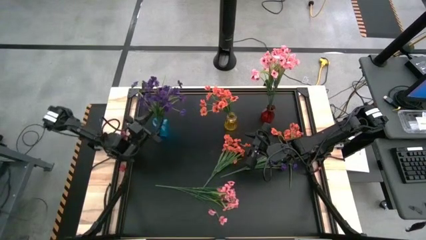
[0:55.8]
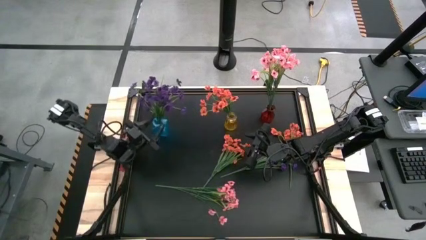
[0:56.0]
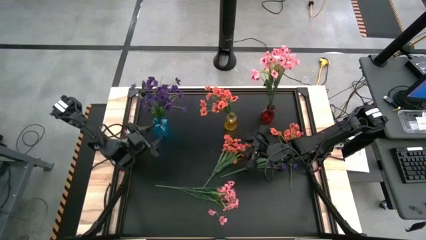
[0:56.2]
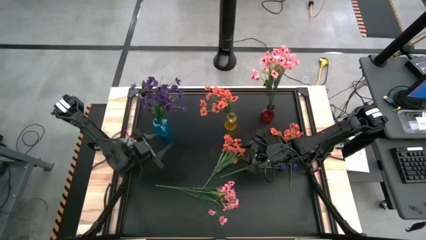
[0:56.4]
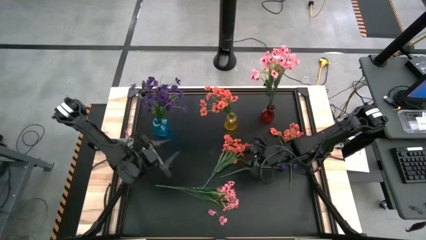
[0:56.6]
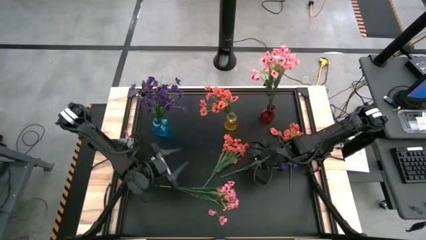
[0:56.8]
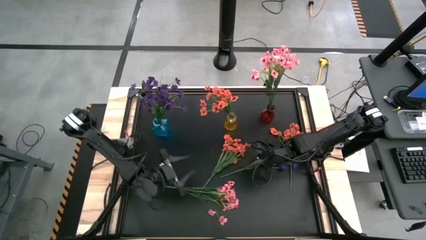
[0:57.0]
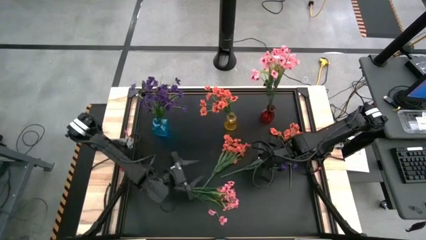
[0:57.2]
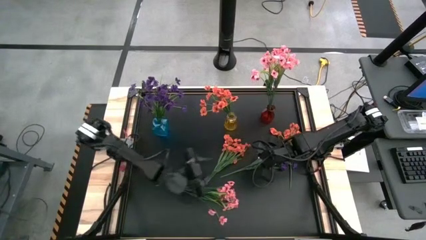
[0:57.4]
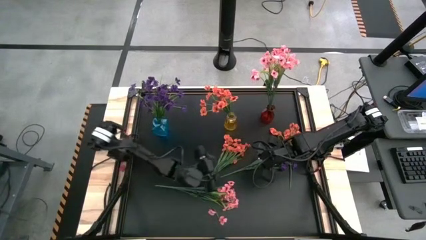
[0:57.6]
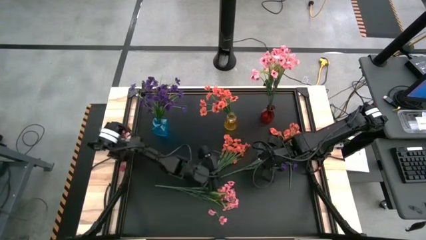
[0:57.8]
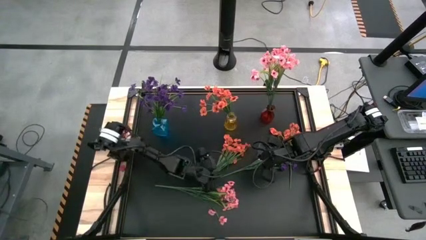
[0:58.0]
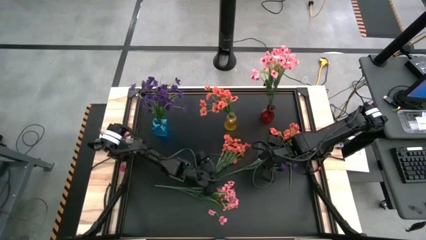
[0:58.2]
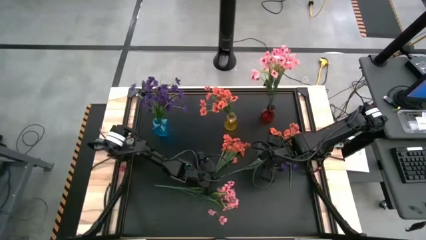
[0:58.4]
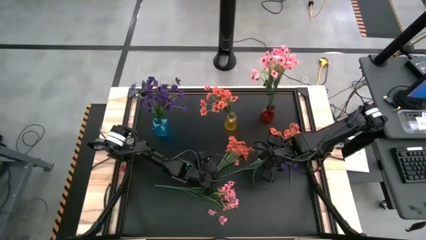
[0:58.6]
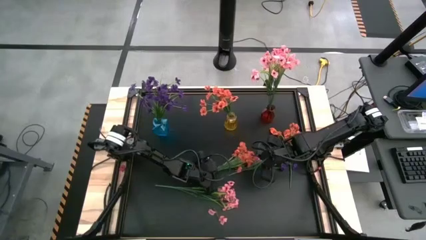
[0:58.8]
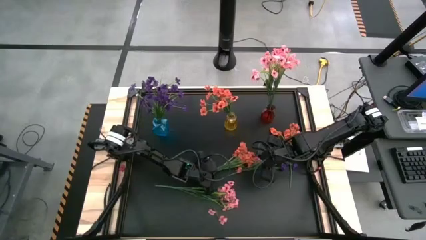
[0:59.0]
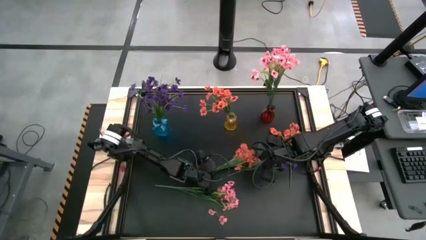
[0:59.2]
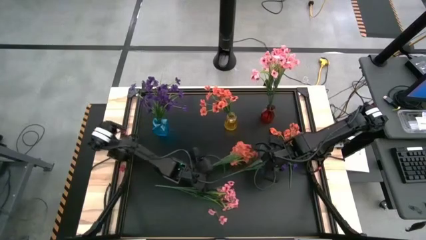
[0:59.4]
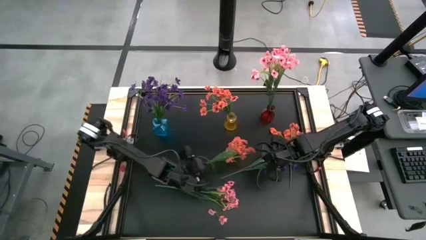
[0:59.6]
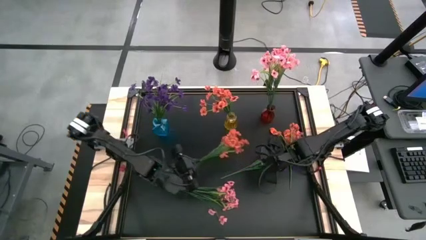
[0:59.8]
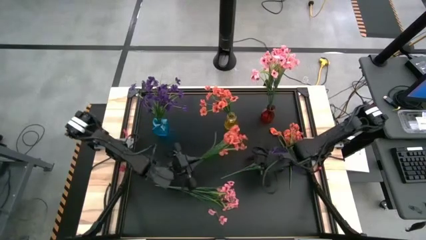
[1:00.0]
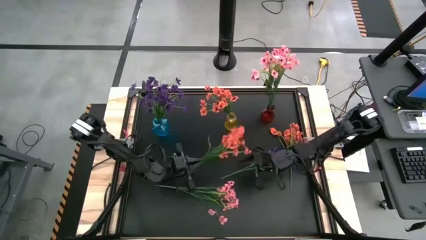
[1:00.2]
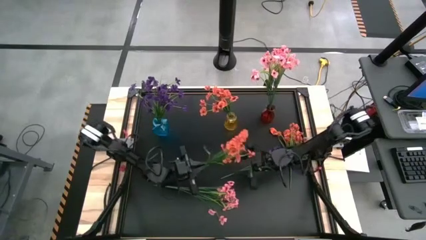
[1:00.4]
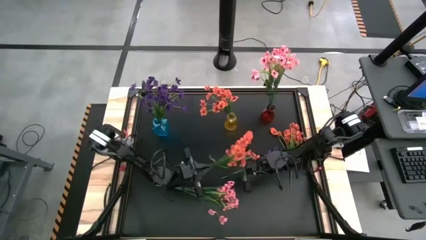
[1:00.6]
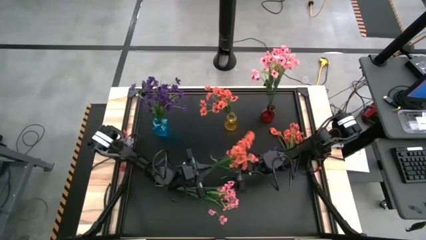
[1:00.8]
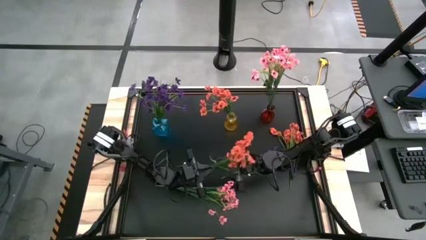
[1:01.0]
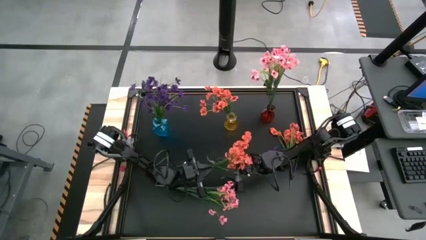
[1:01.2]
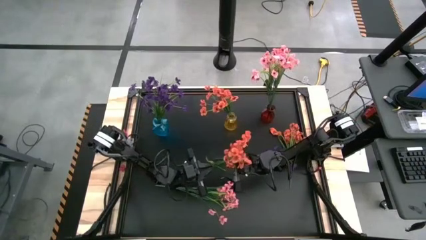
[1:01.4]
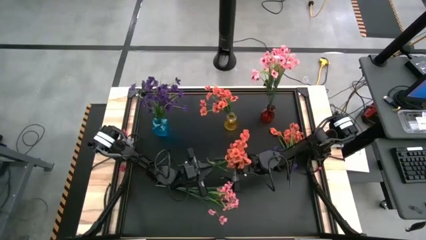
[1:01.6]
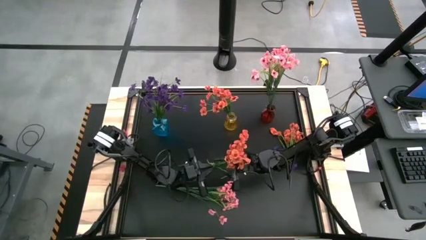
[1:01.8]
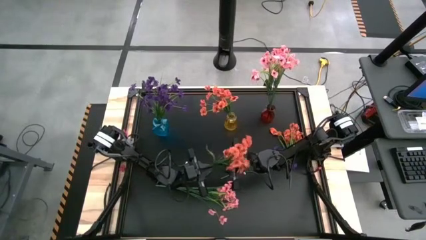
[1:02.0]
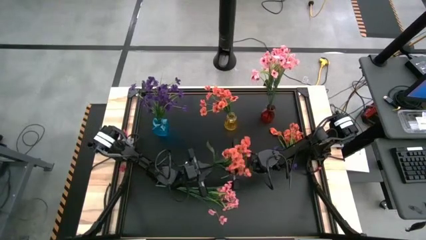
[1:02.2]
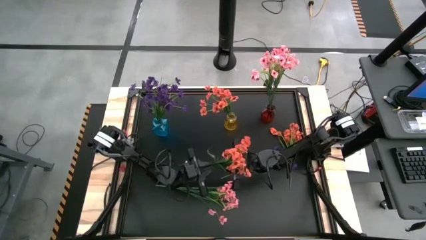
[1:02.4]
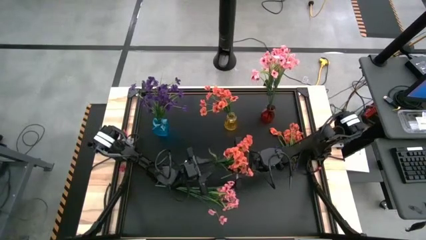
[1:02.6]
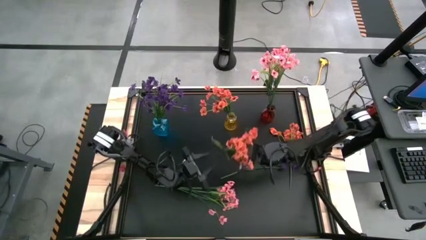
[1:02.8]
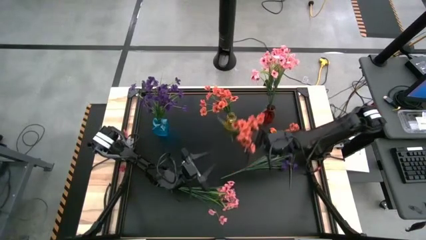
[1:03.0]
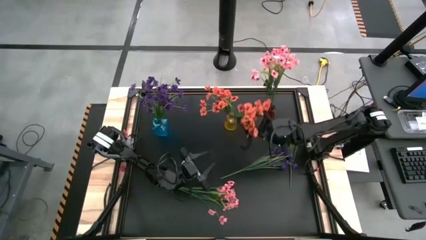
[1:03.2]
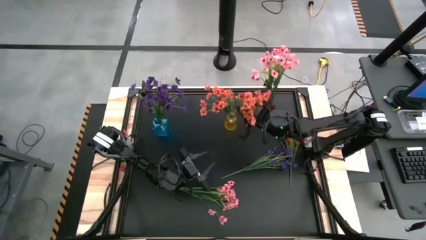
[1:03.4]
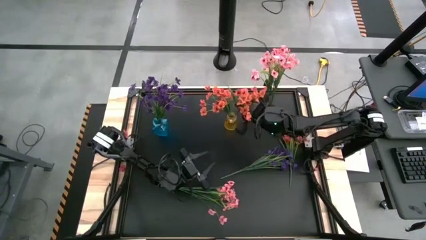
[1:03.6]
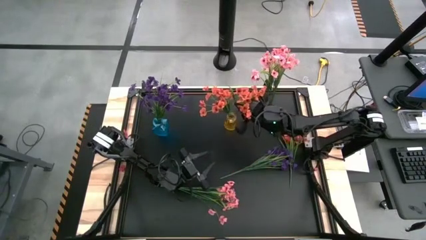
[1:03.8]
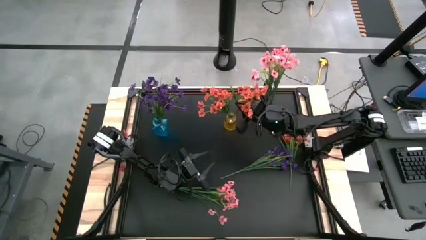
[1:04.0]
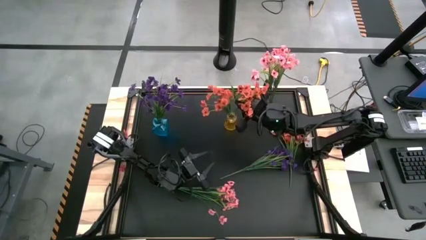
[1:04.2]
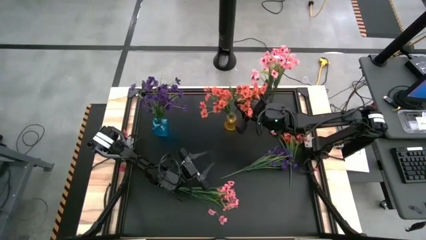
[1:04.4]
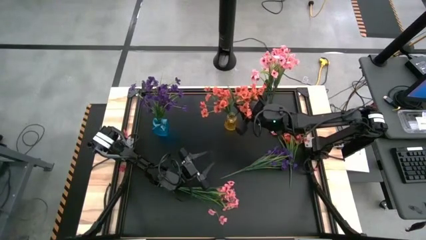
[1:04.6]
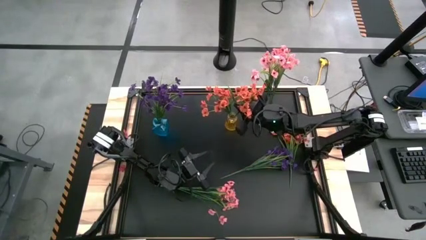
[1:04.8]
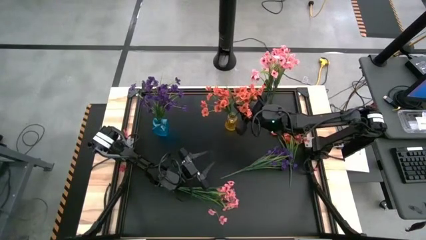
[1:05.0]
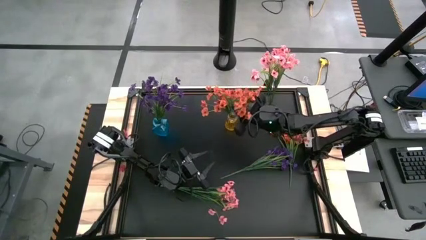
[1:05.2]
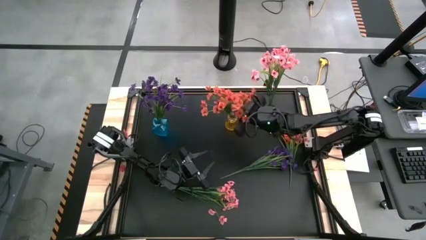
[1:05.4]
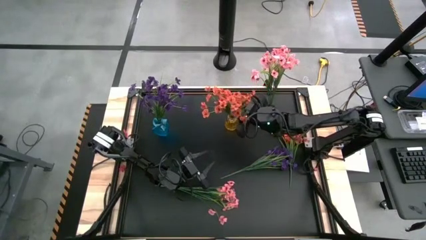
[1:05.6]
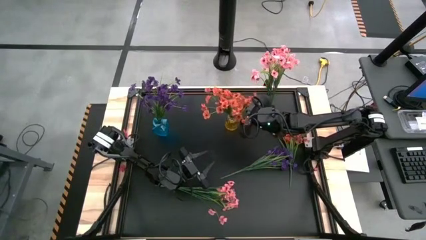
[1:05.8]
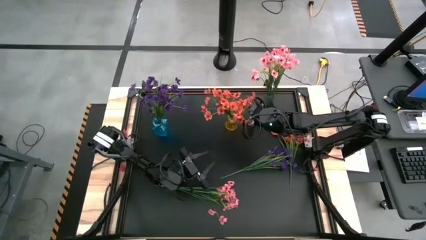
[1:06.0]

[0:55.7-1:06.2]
Task: Sort flowers into vase by color
Put the left orange flowers into the yellow flower vase

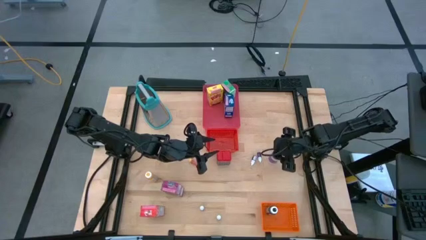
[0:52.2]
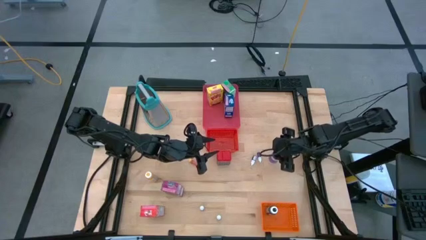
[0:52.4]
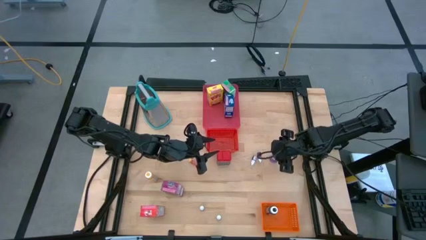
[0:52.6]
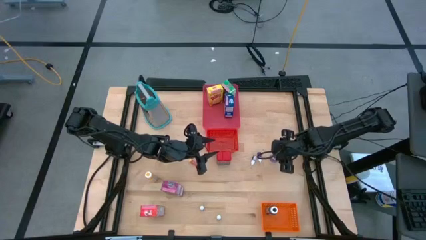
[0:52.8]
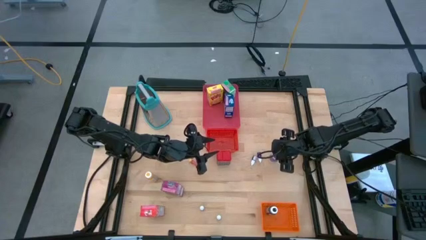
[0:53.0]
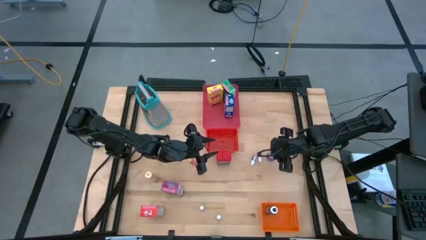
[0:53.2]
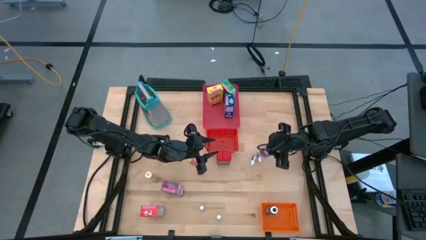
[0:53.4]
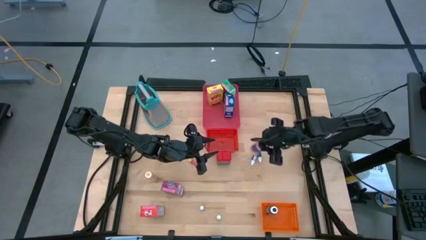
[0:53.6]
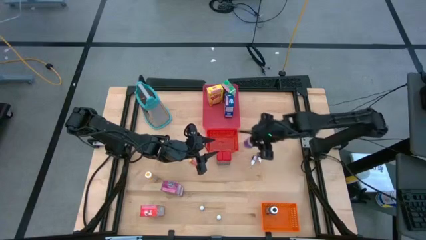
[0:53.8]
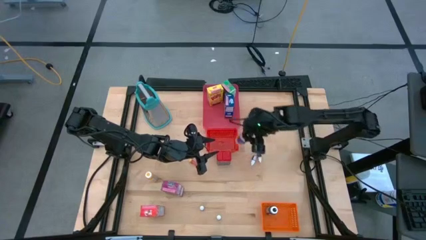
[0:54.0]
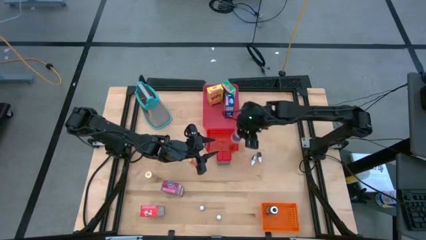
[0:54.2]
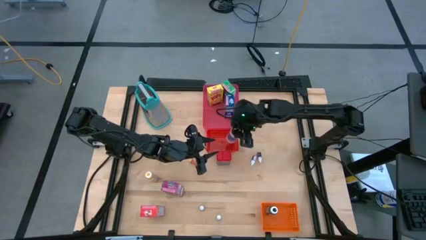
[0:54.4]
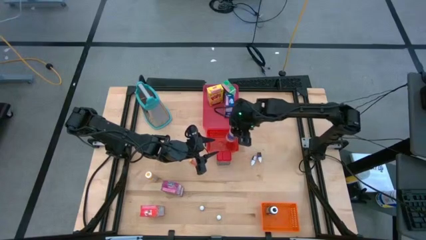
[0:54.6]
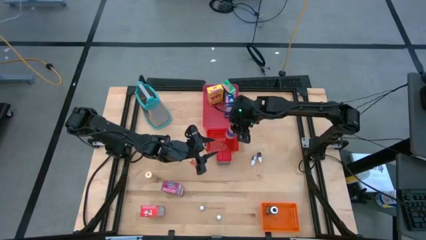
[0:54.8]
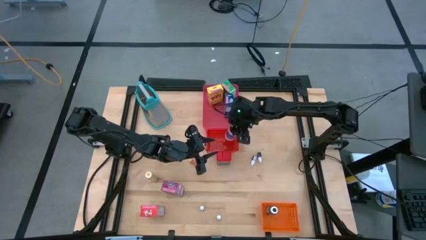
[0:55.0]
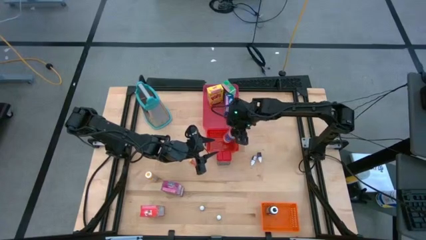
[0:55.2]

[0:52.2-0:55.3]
Task: Pick & Place Kitchen Items
Put the black seasoning bottle into the red bin

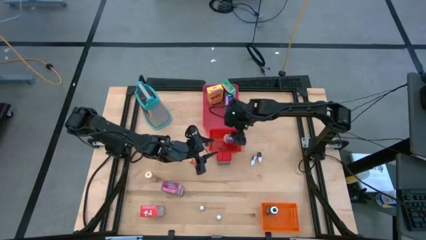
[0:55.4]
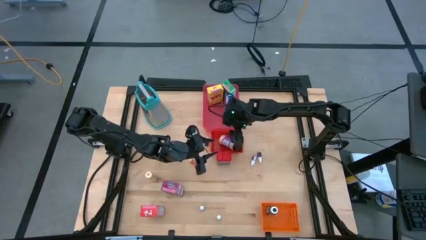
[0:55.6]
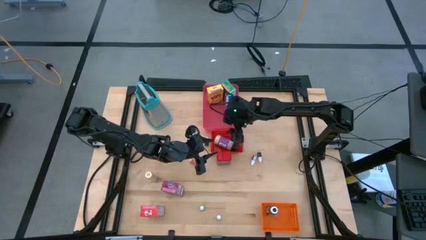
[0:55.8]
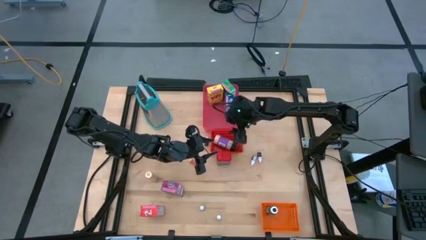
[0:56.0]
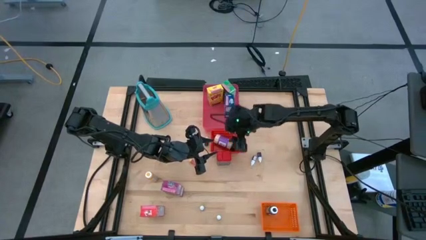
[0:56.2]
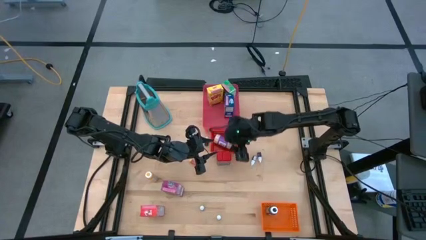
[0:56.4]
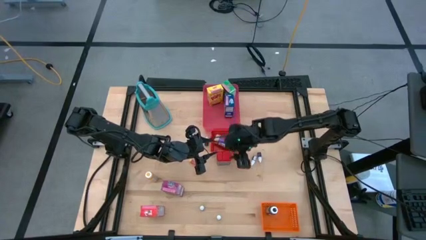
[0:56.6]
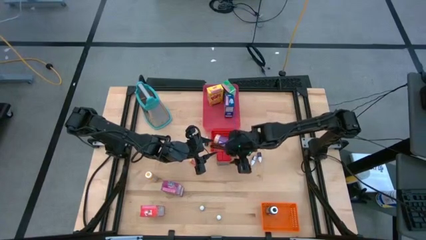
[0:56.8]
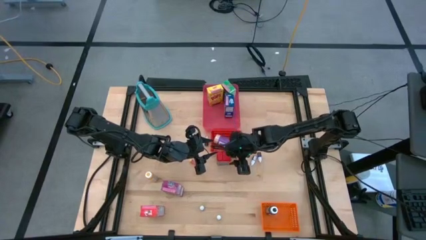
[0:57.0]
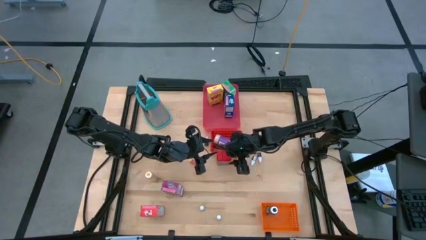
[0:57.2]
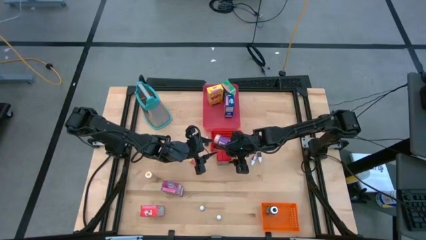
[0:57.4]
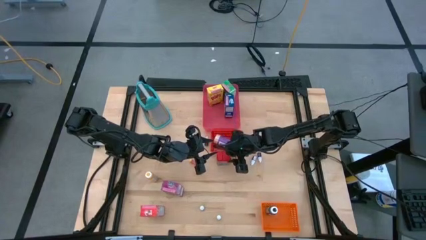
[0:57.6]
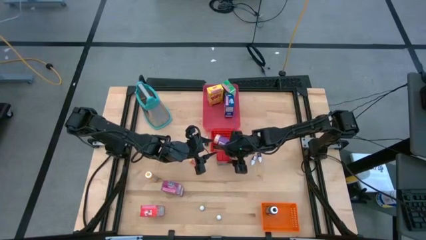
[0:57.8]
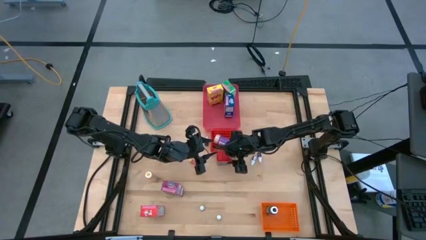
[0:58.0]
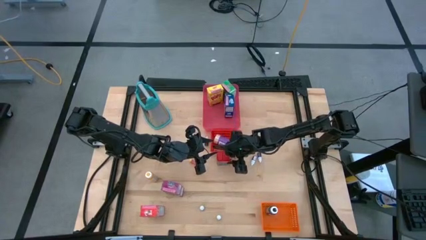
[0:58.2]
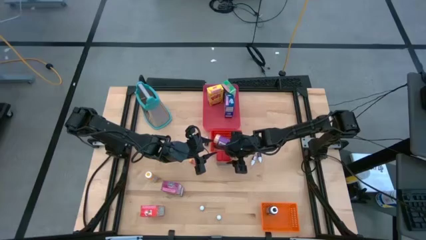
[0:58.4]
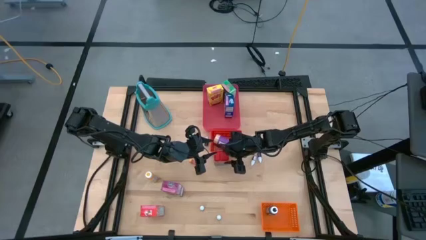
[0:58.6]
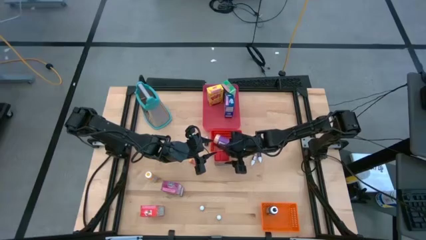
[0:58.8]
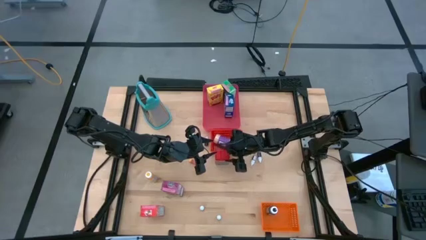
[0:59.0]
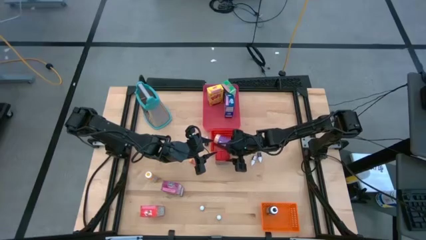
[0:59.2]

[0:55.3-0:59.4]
Put the red seasoning can into the red bin
